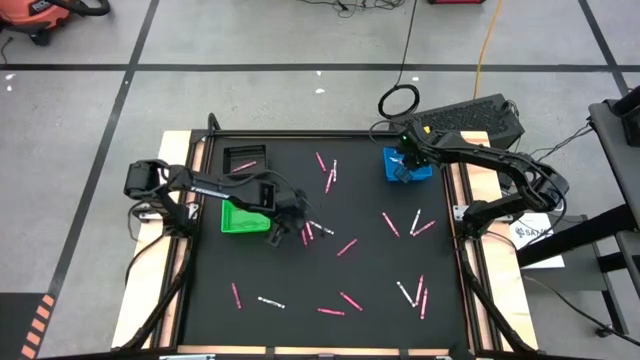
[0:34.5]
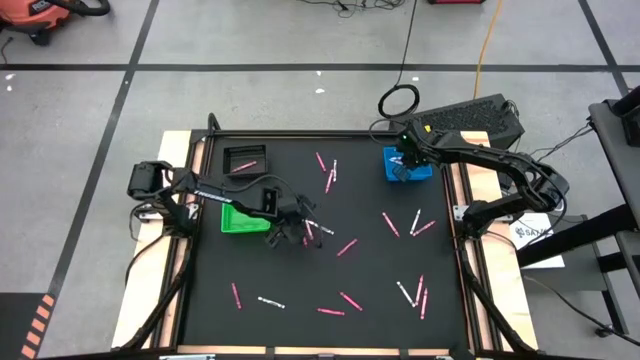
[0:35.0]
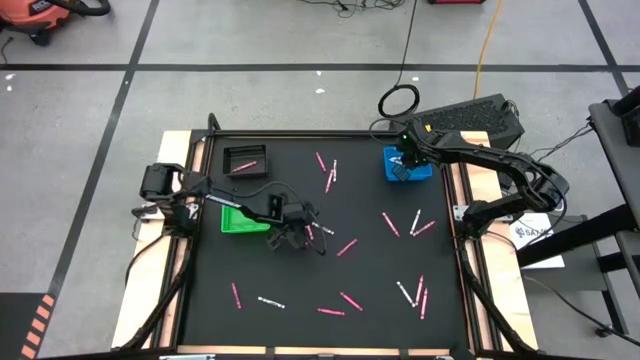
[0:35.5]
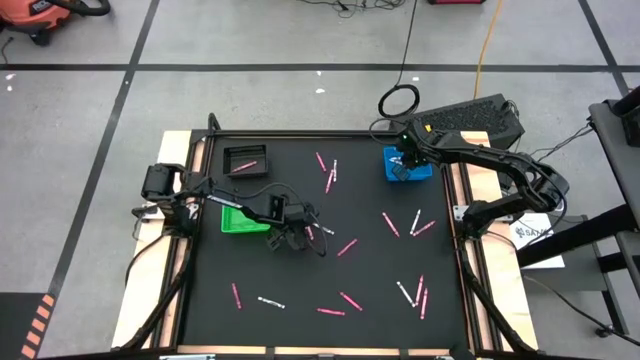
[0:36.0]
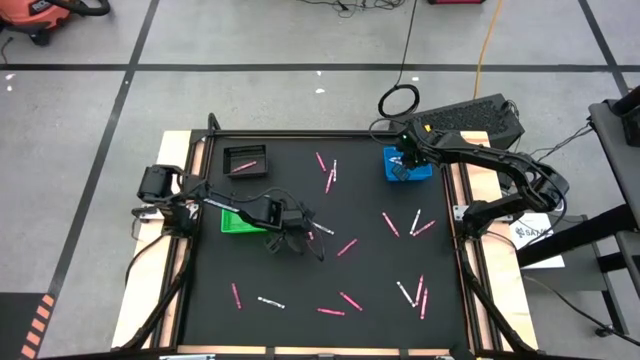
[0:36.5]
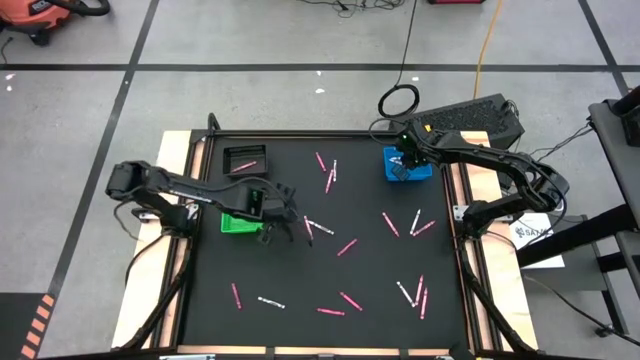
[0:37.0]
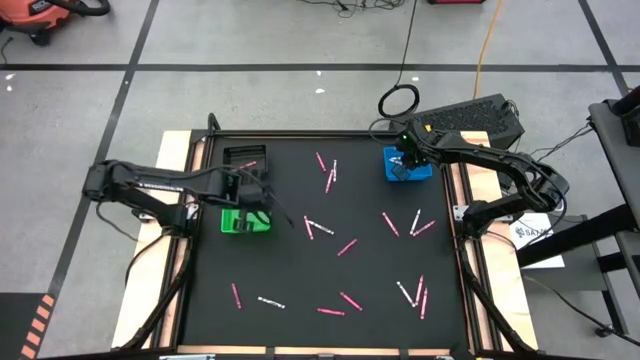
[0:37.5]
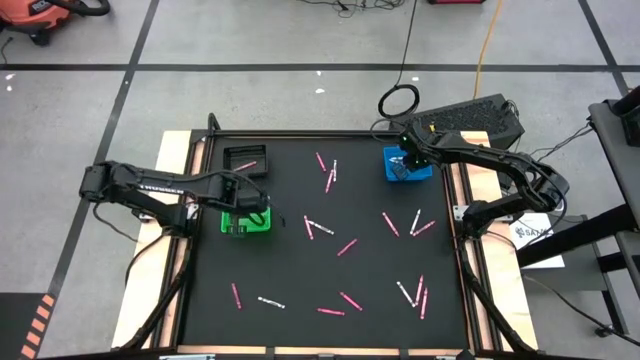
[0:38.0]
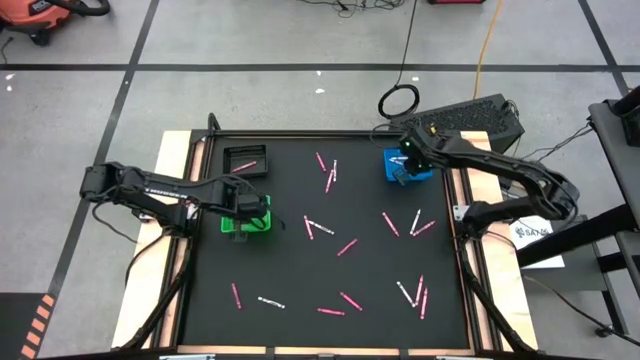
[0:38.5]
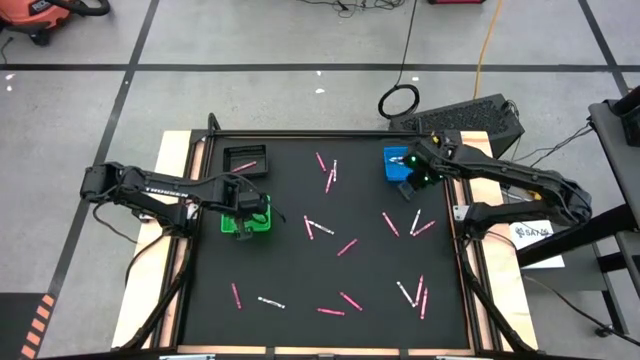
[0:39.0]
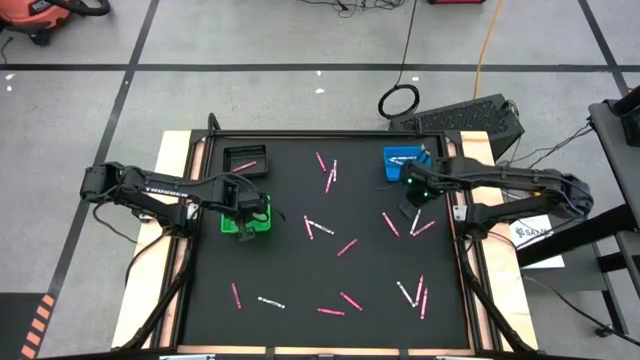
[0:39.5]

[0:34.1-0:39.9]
Task: Sort crayons
Put the red crayon into the green bin

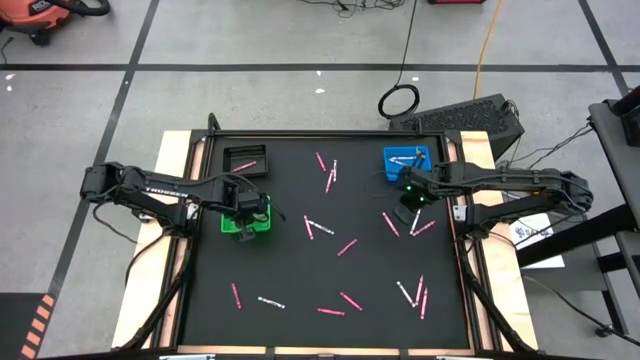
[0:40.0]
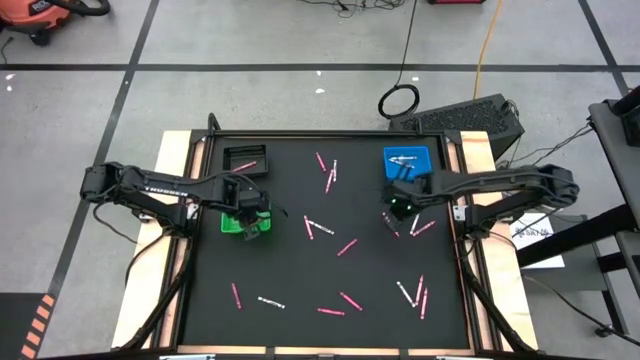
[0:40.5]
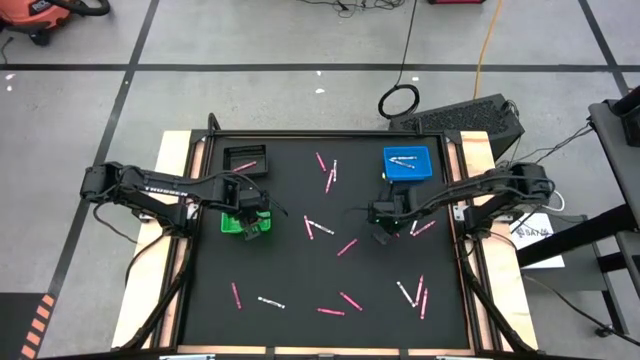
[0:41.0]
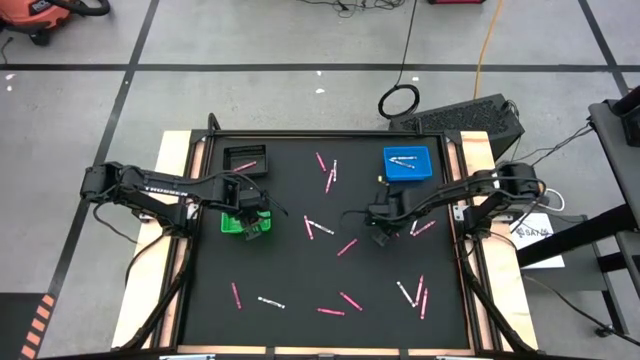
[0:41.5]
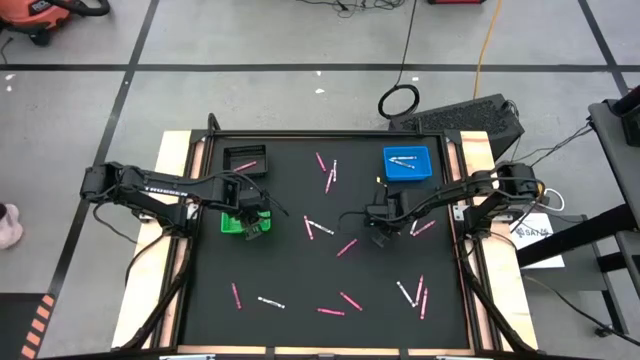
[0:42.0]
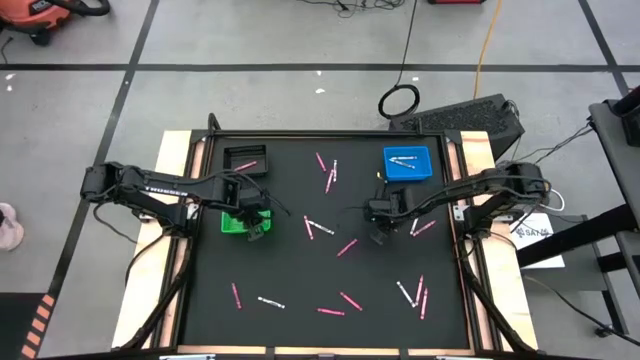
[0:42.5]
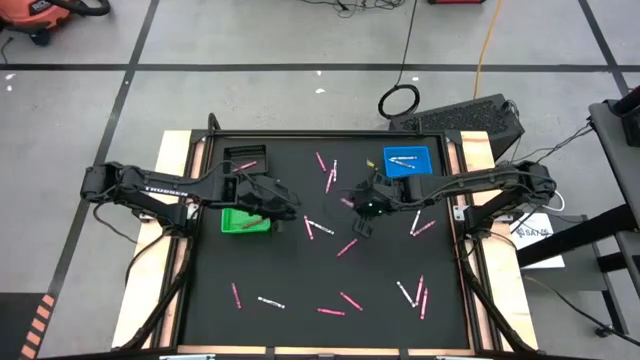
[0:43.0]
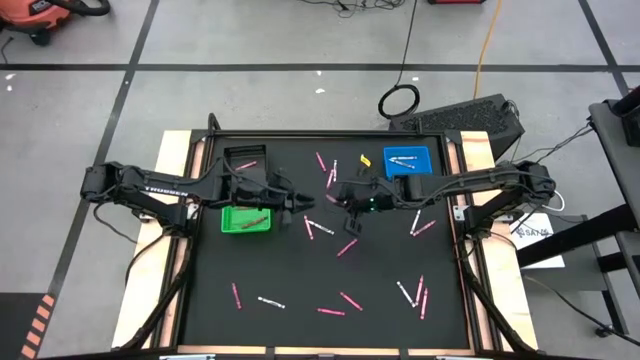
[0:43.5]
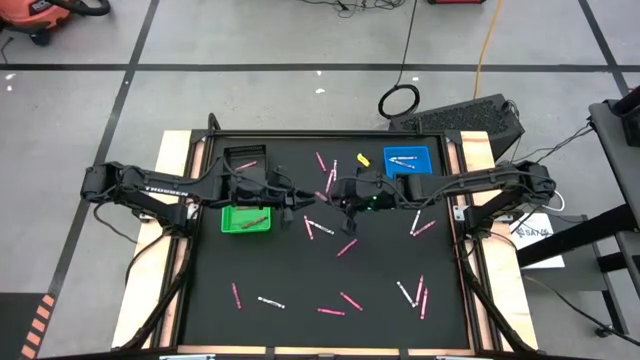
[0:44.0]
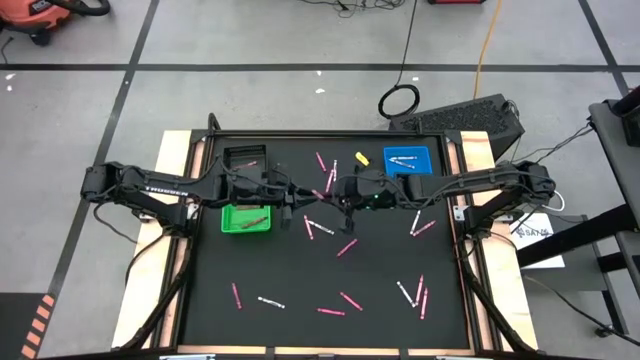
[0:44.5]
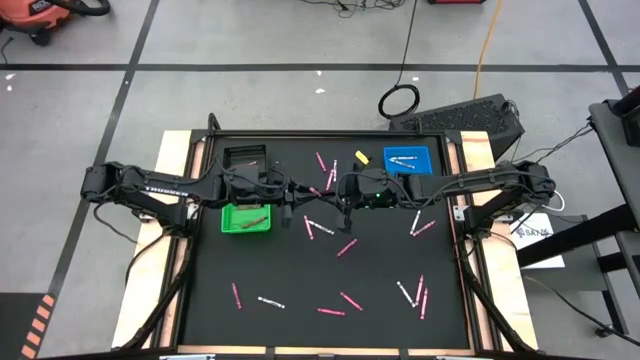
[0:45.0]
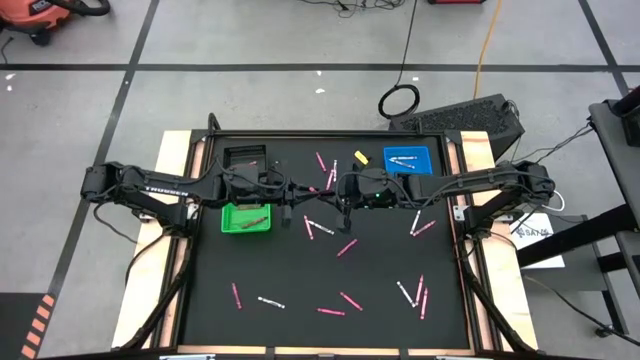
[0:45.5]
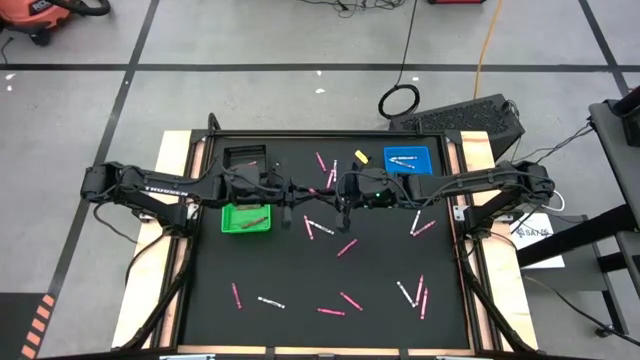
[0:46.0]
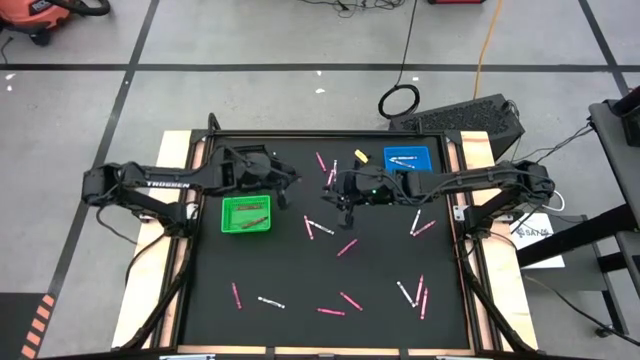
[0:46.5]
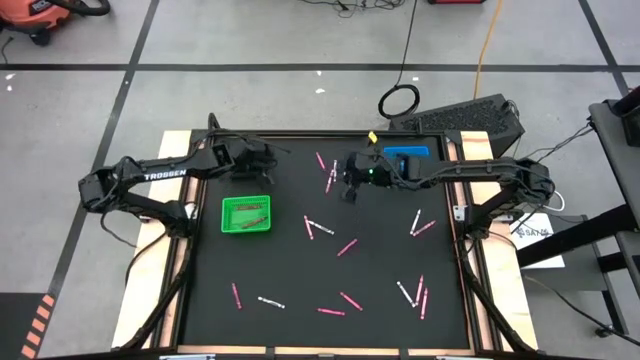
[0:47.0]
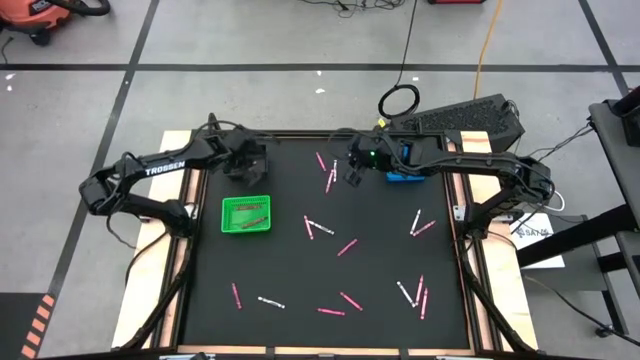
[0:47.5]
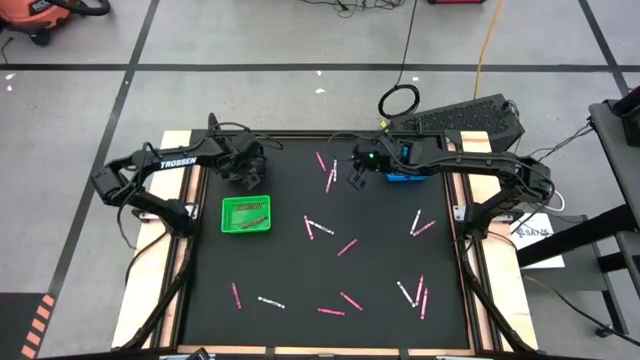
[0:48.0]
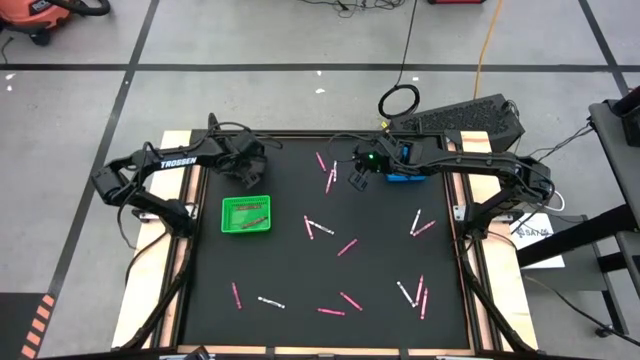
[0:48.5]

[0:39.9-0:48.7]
Put the pink crayon into the black bin

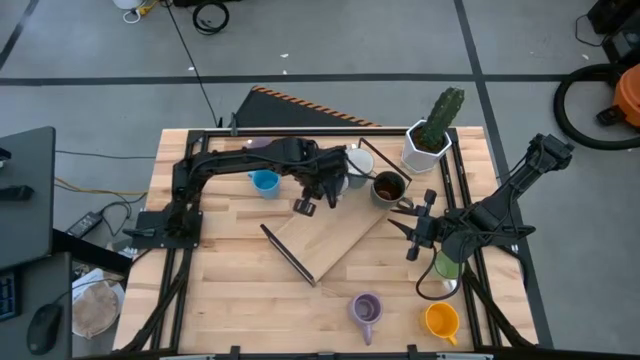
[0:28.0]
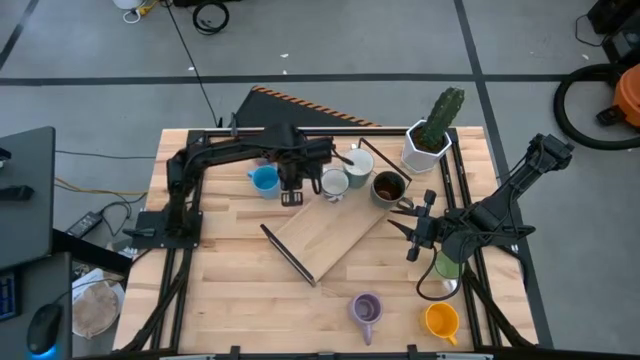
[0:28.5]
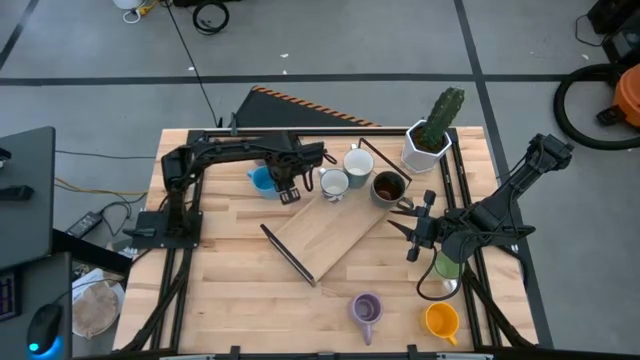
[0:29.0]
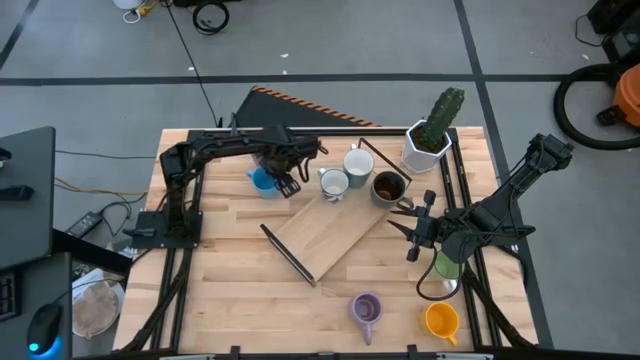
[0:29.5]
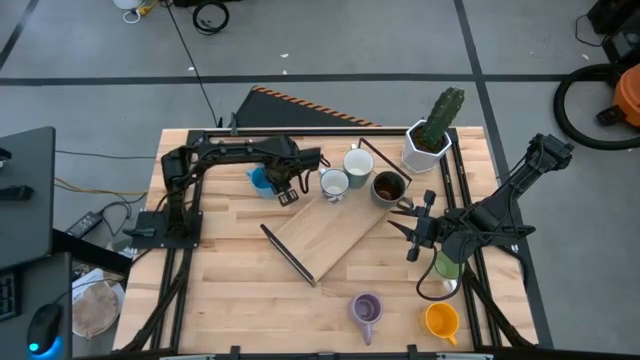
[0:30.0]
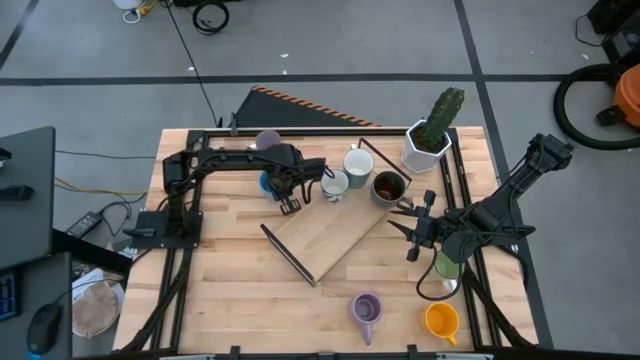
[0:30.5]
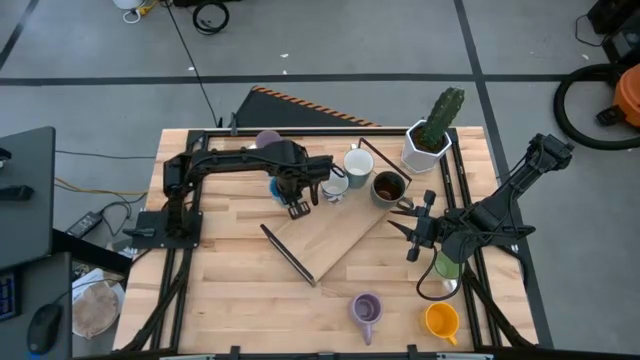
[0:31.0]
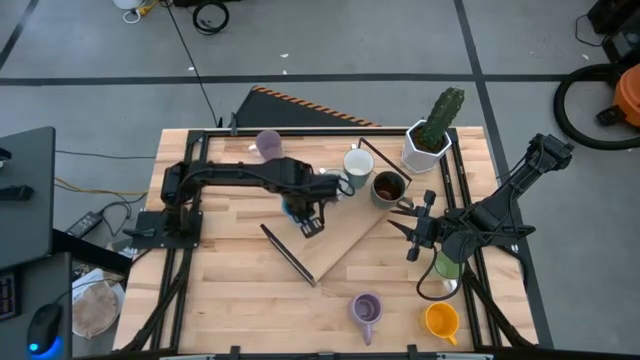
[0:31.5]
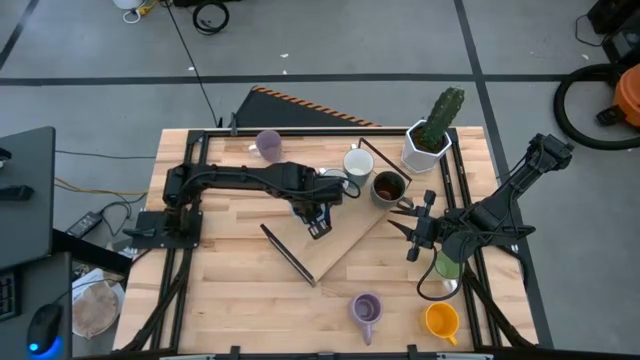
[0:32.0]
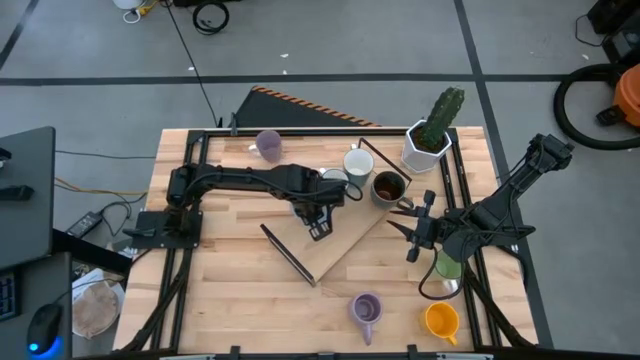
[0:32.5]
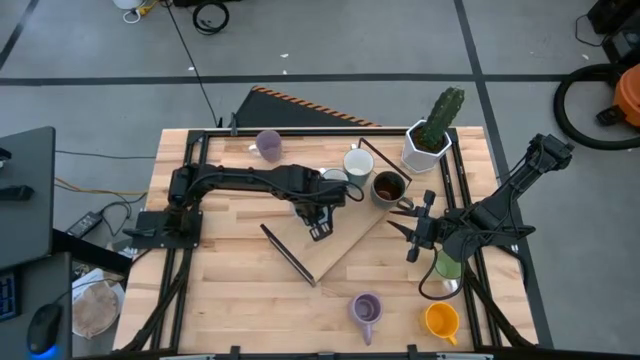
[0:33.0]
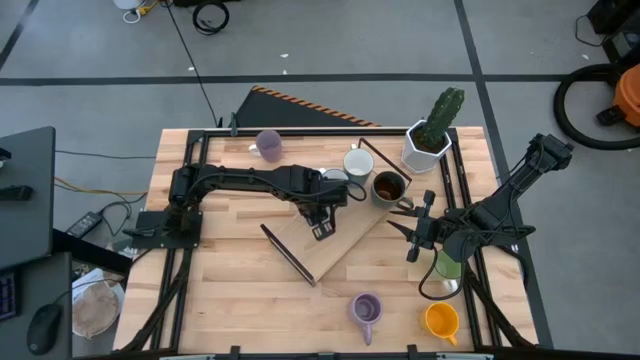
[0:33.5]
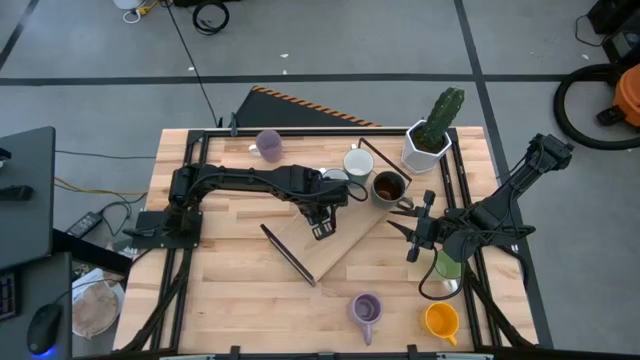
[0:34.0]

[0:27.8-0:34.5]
Task: Place coffee mugs
Put the blue mug on the shelf
